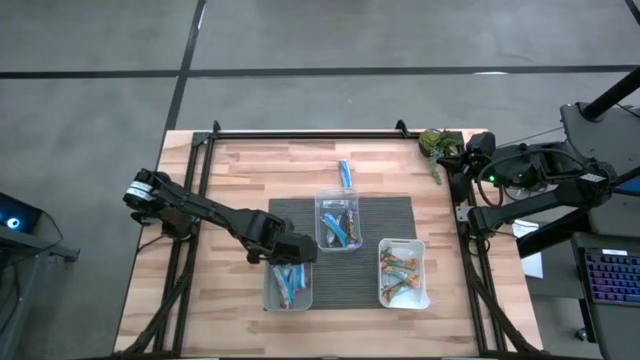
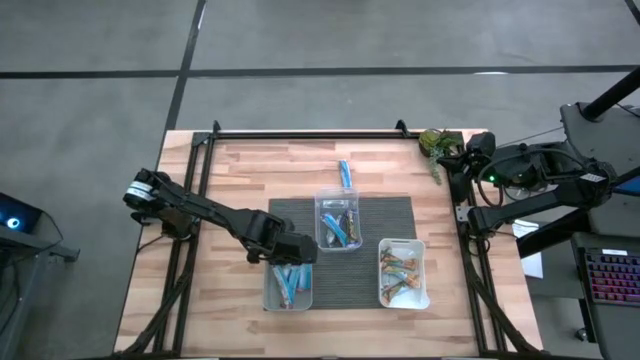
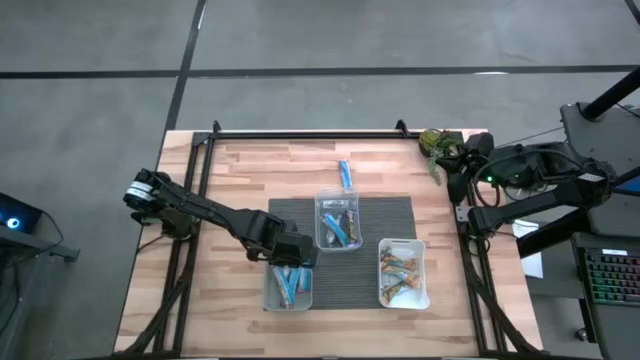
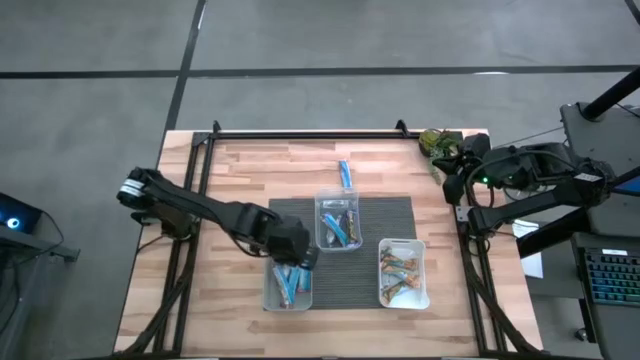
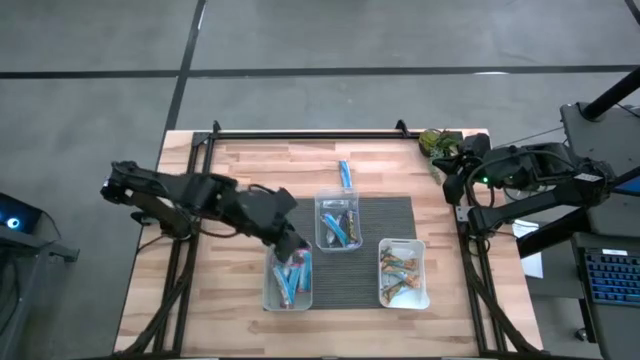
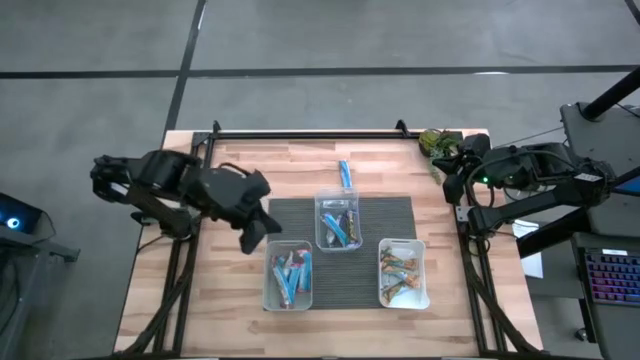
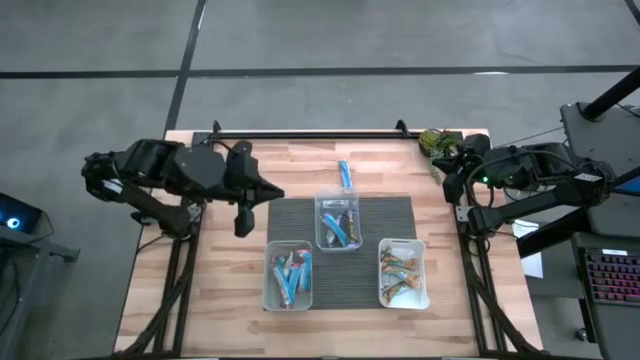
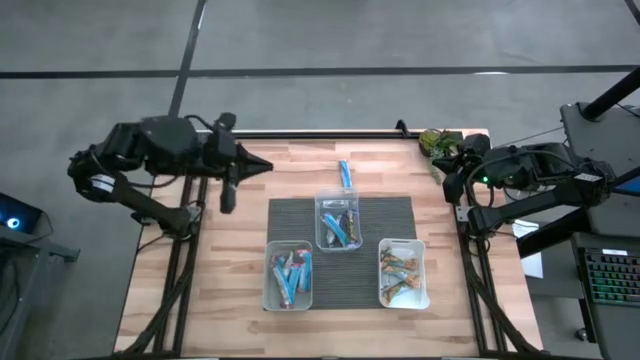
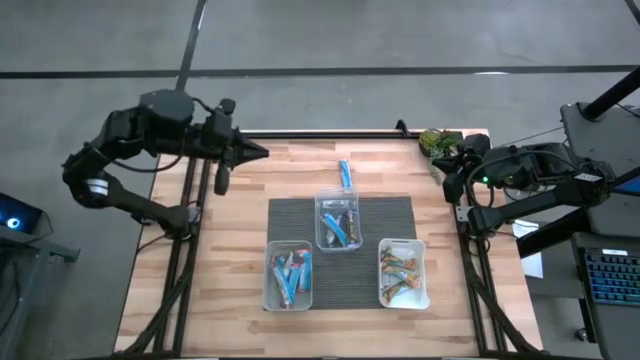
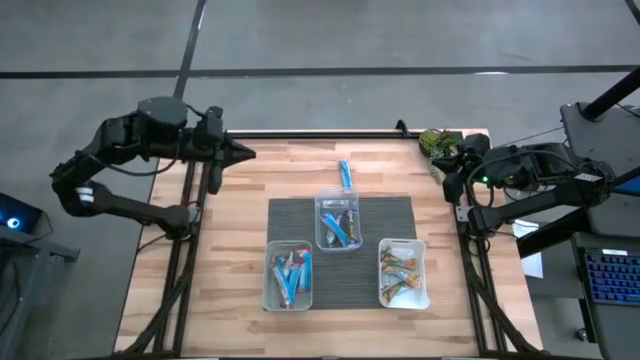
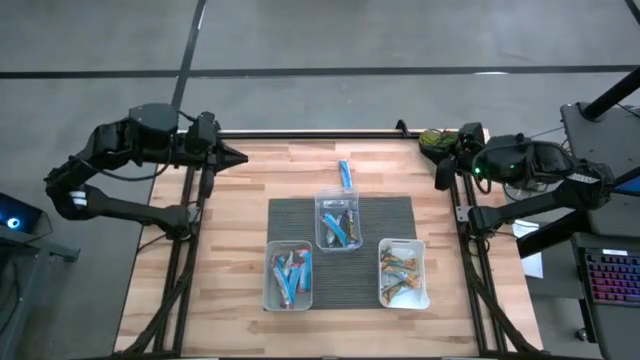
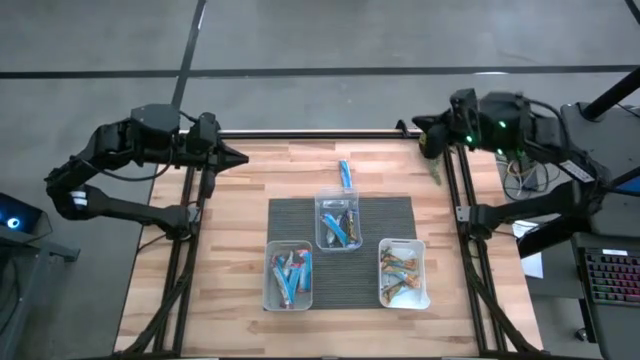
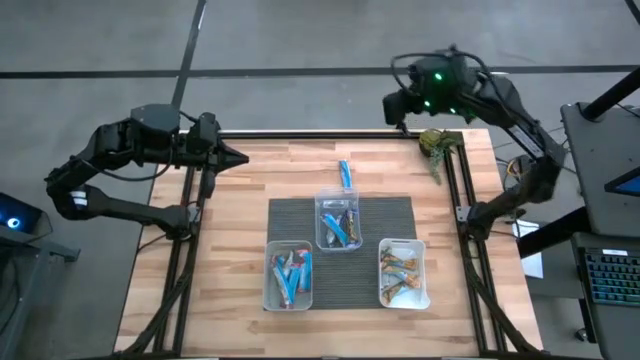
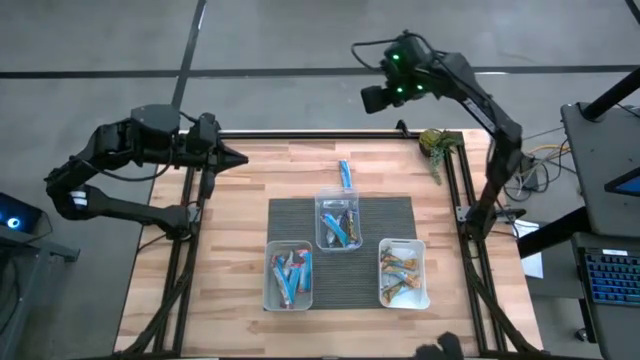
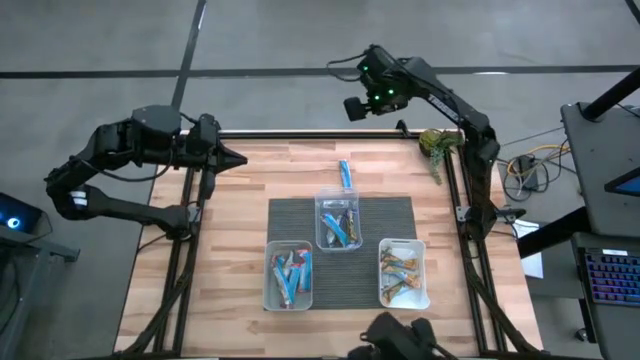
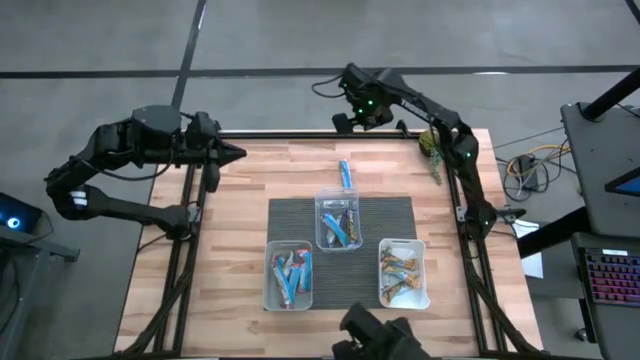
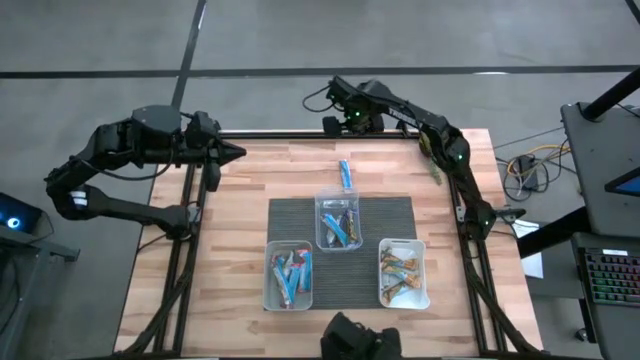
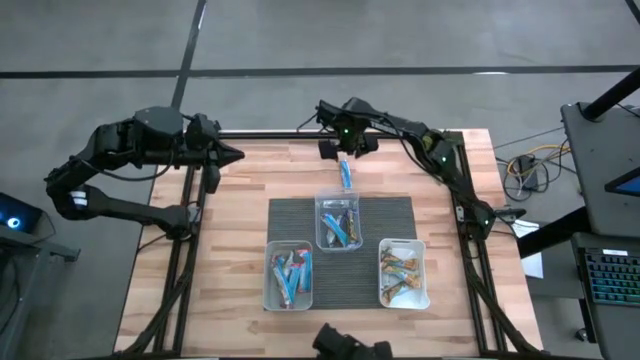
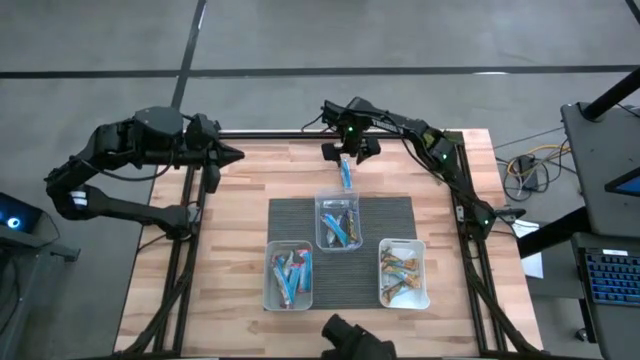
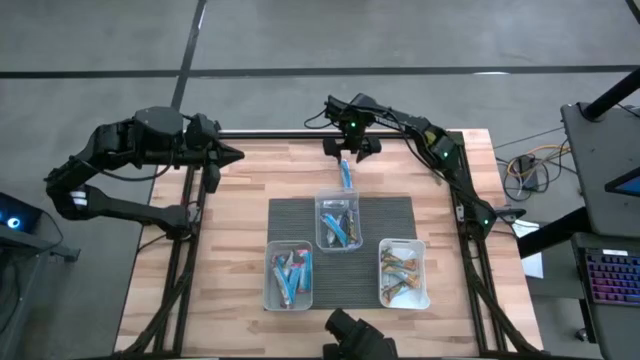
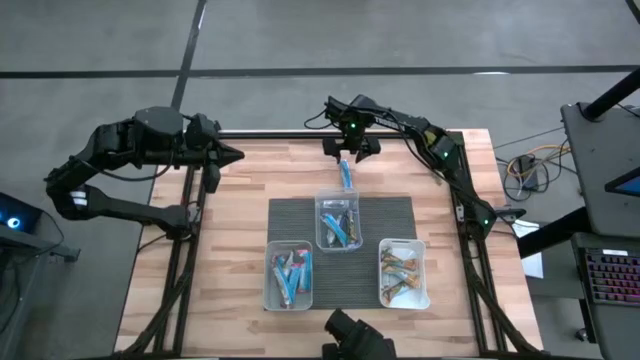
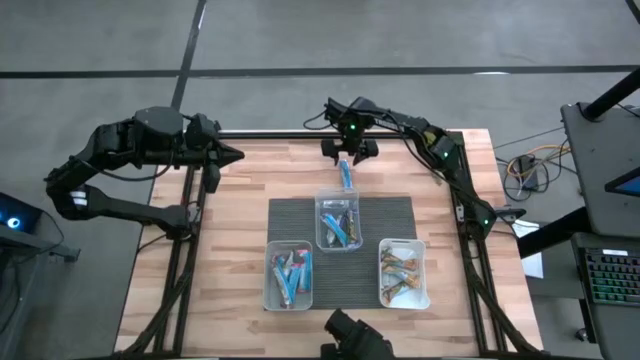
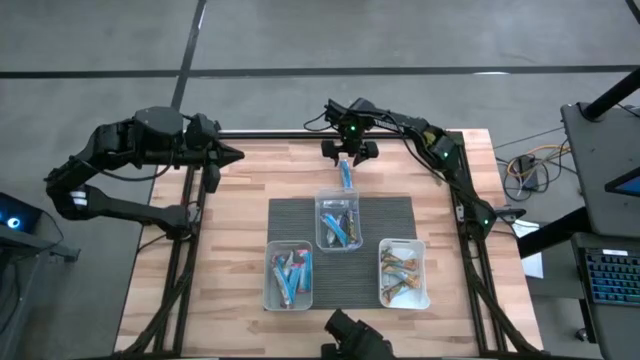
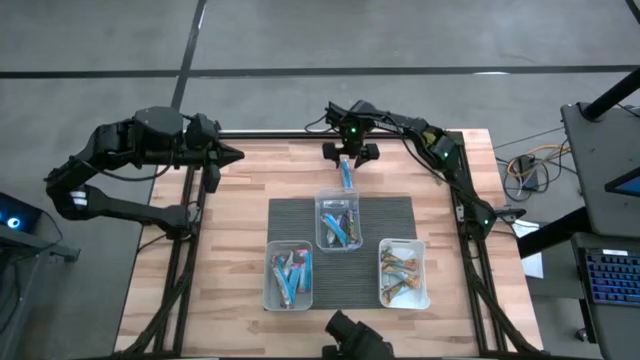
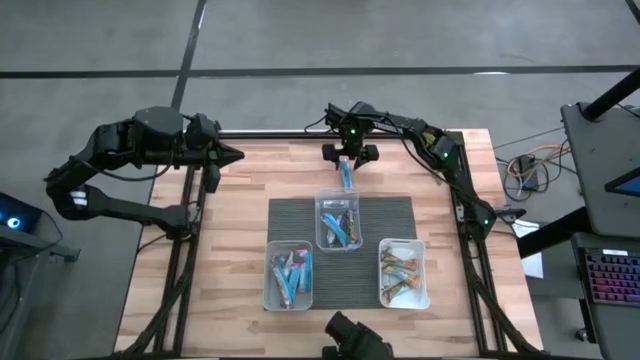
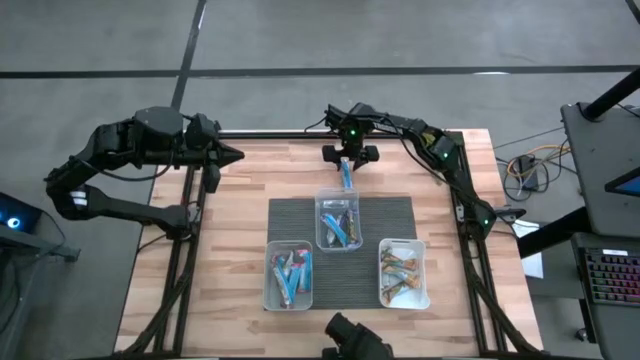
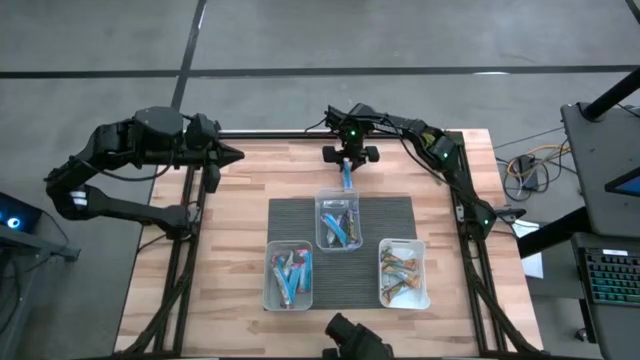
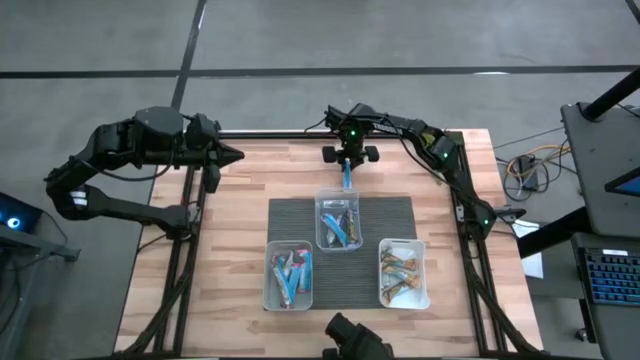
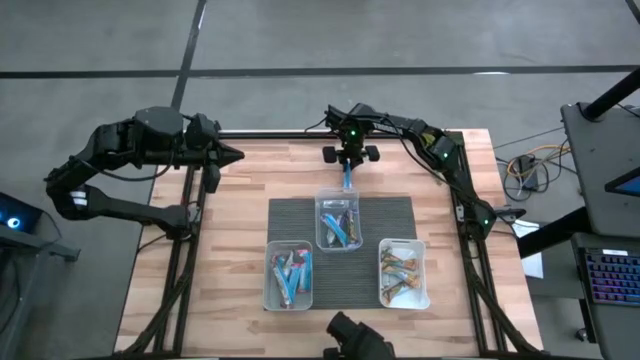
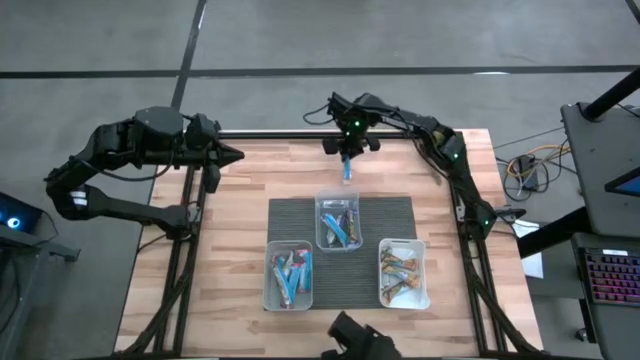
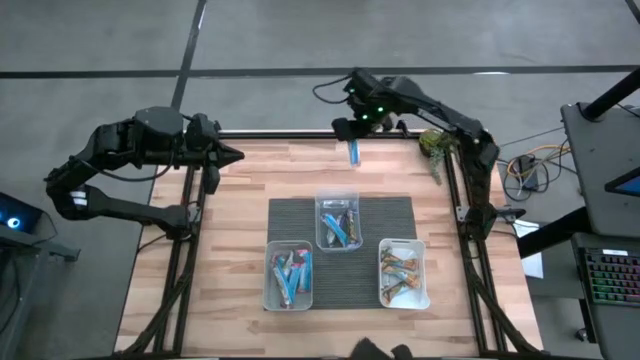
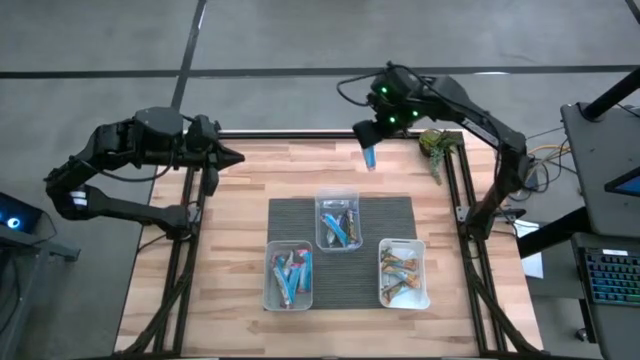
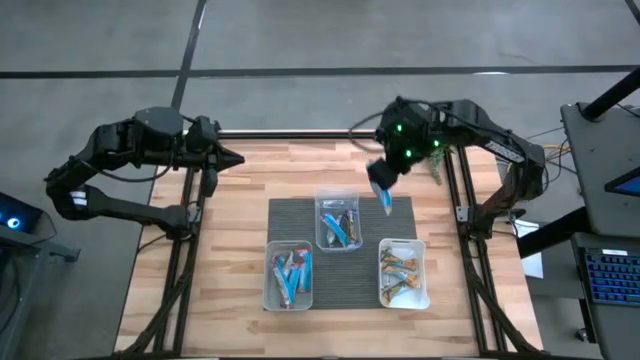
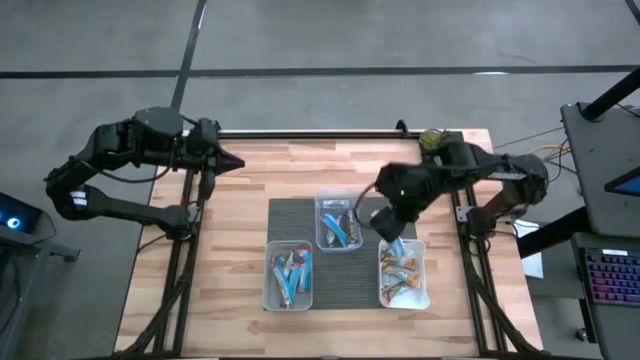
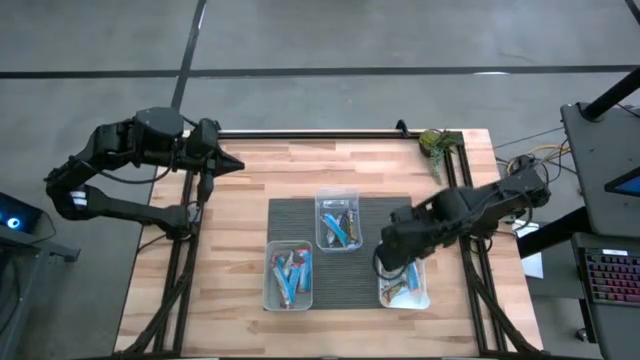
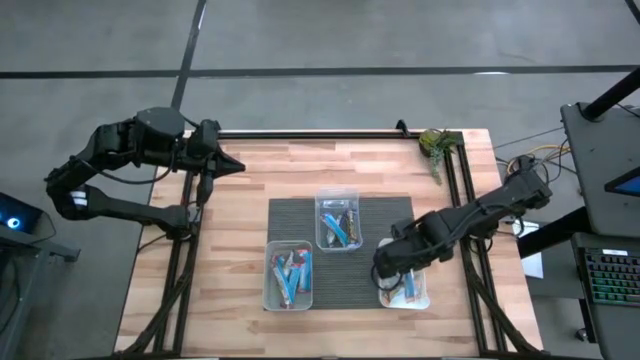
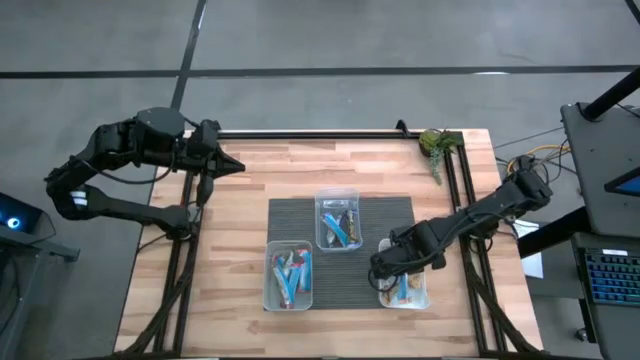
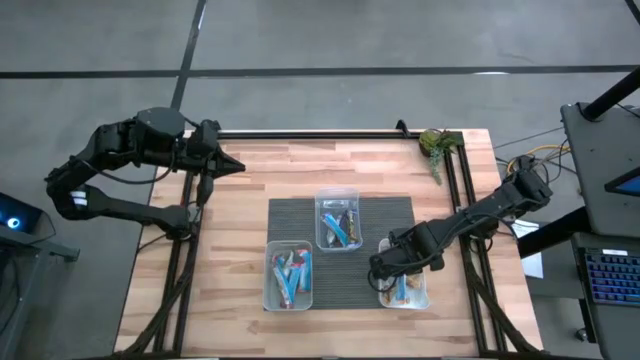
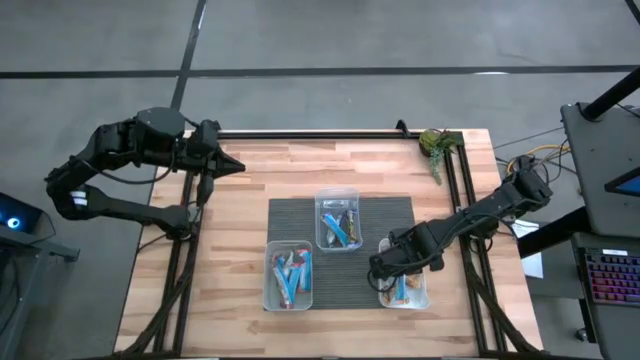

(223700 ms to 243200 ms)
Task: Pick and place Granola Bars by type
Put the orange granola bar into the white bin

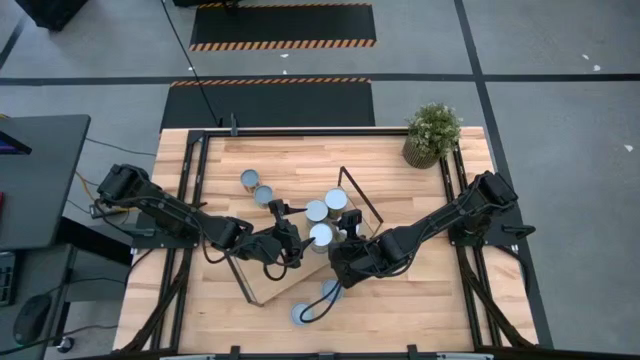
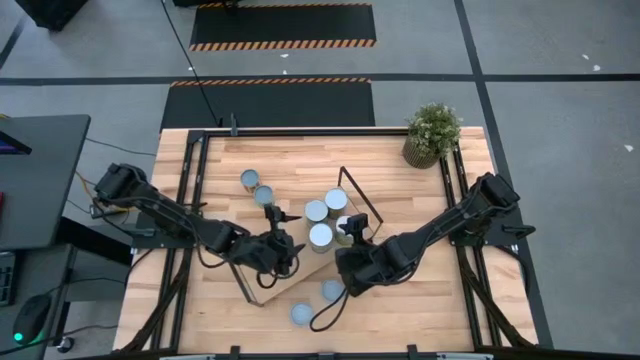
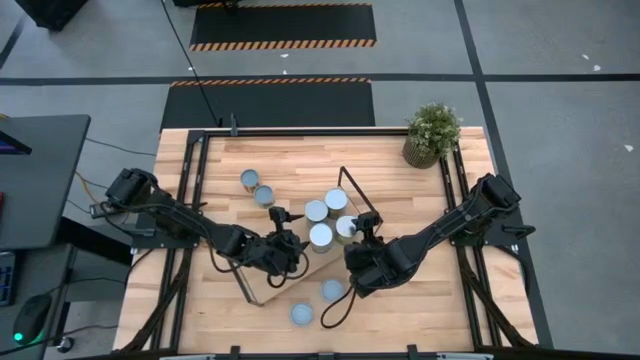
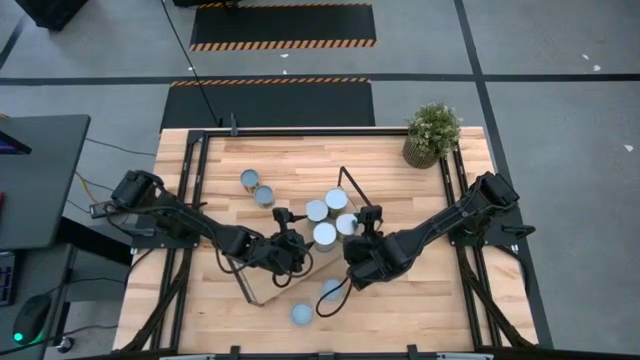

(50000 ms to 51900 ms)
Task: Pick and place cans onto a shelf
Adjust the cans on the shelf
